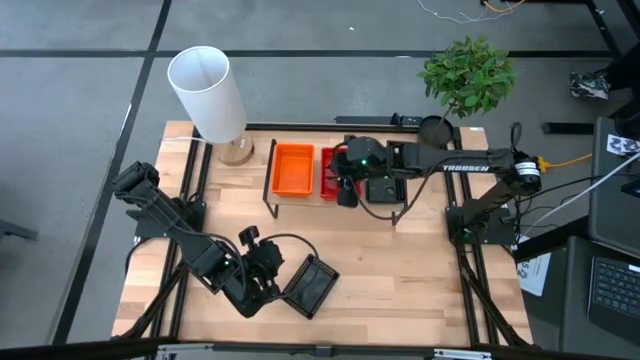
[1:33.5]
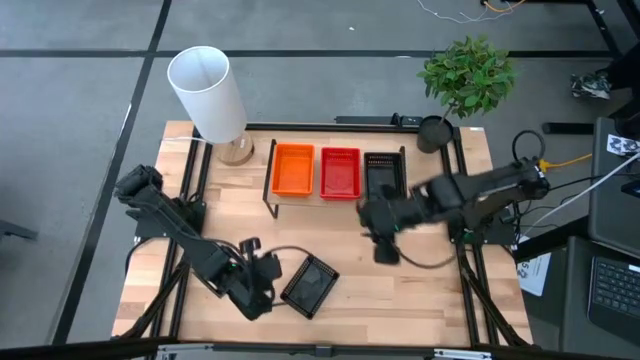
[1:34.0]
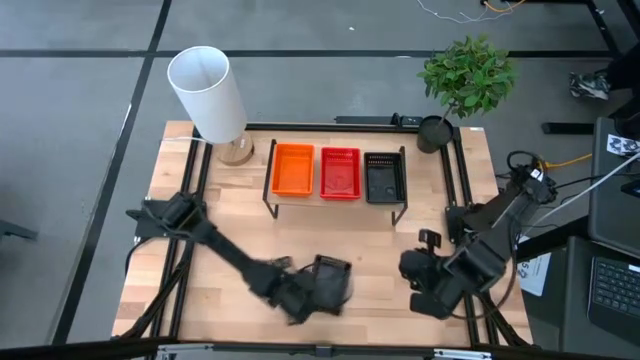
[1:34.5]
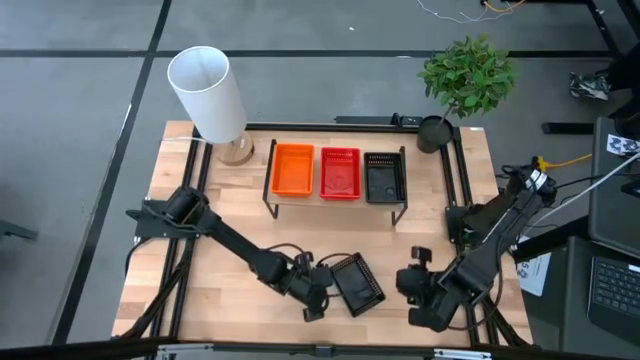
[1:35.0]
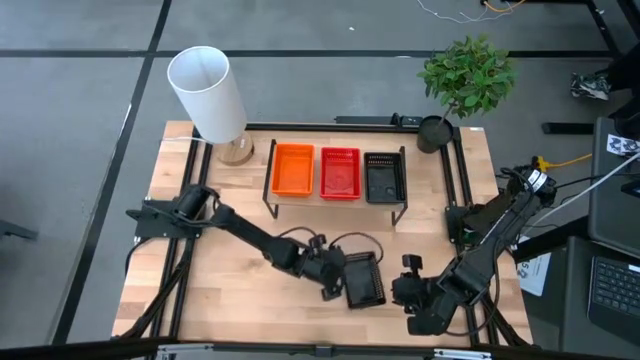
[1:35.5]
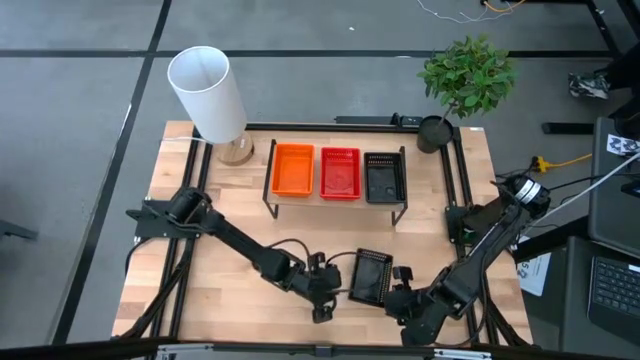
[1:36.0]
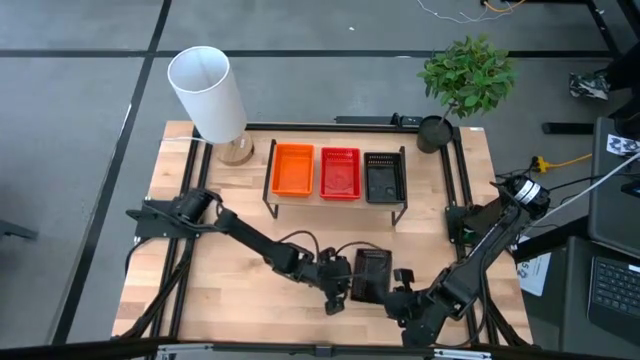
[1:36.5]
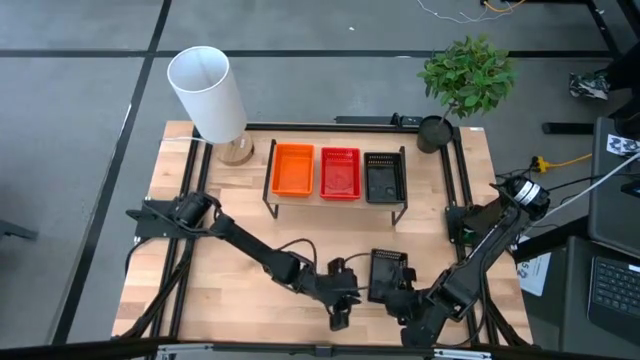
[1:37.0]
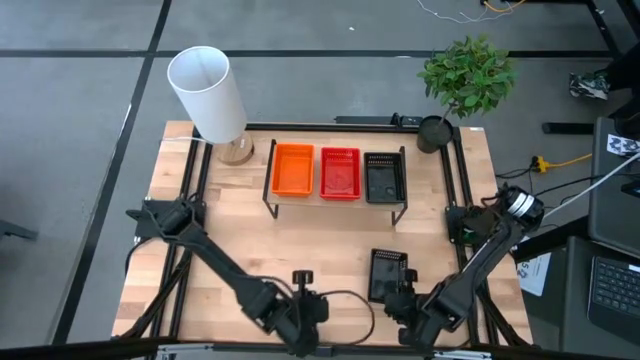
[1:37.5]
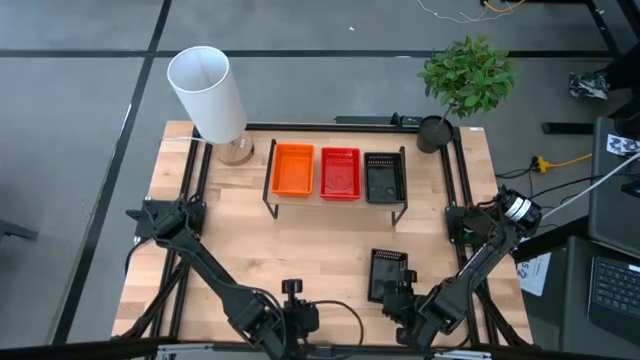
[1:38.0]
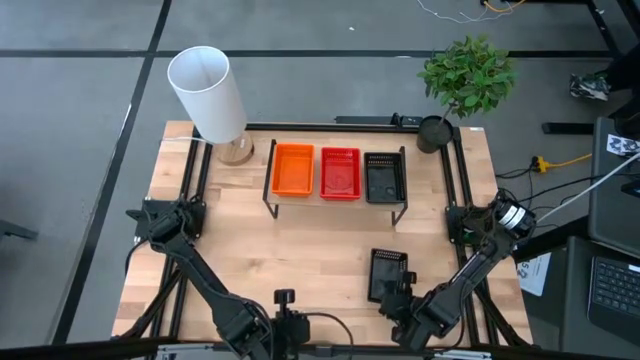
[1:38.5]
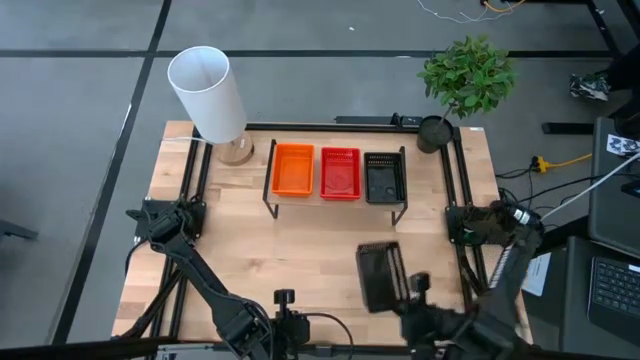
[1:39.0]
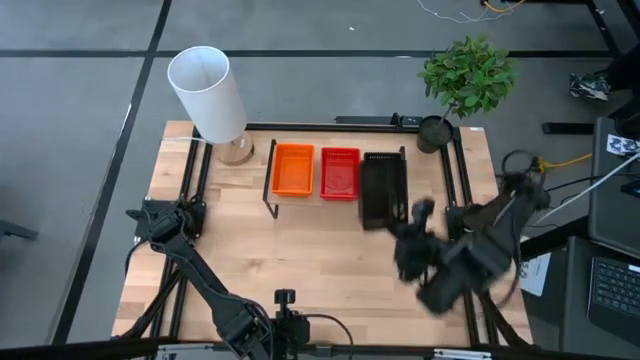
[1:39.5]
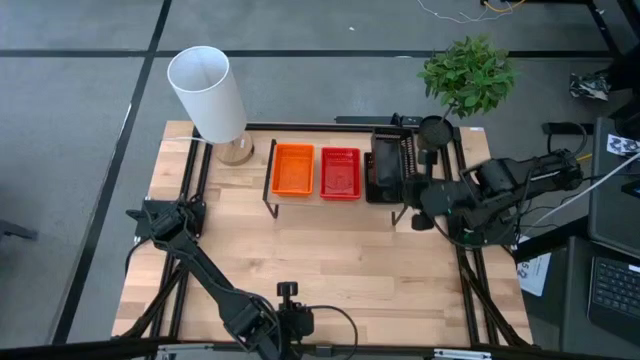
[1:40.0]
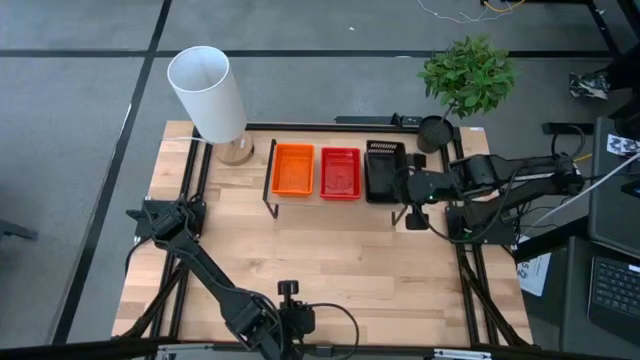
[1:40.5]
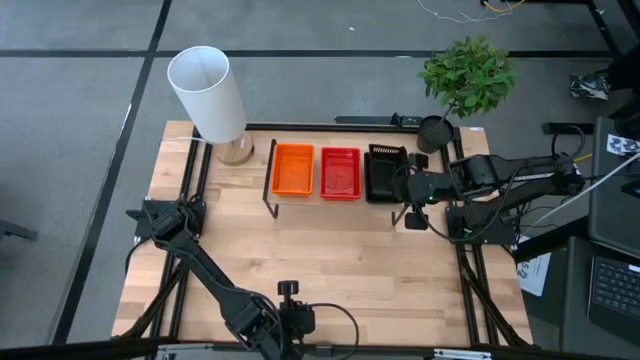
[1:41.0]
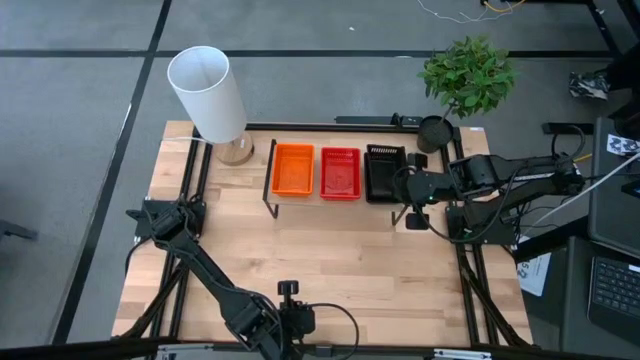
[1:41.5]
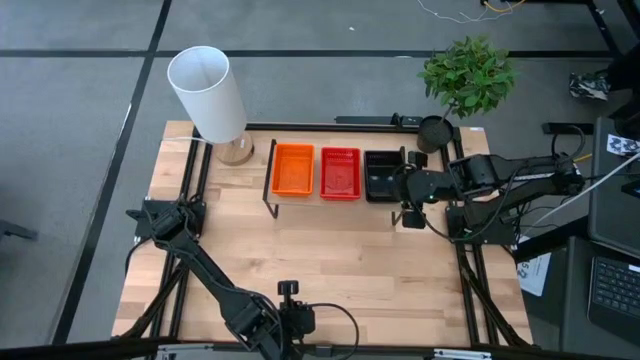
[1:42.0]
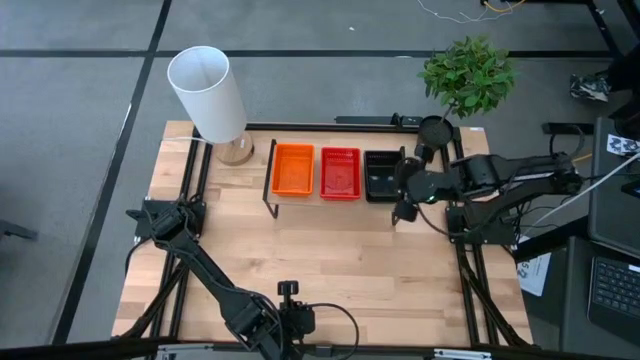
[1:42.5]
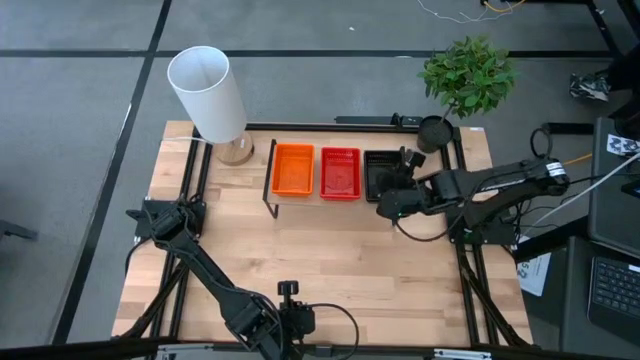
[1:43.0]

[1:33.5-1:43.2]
Task: Stack baskets on shelf by color
Stack the black bin on the top of the other black bins on the shelf

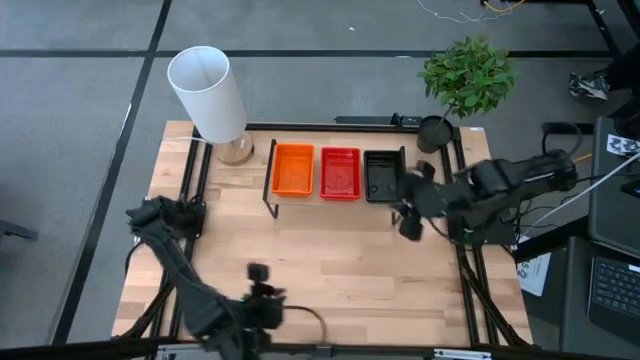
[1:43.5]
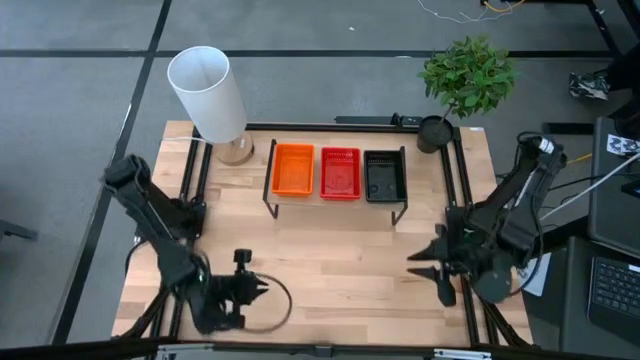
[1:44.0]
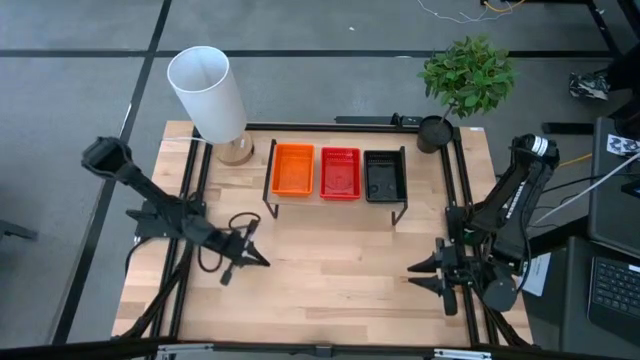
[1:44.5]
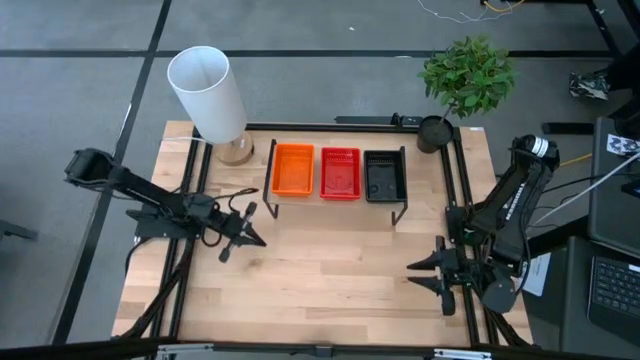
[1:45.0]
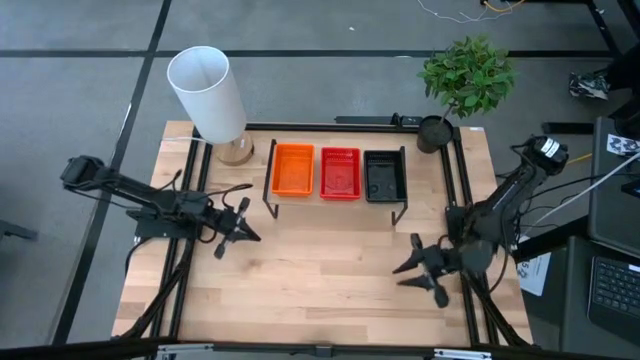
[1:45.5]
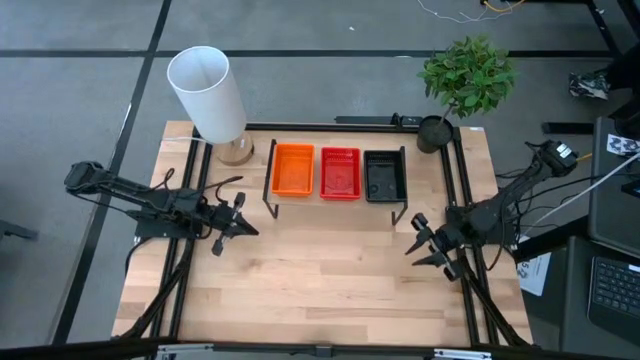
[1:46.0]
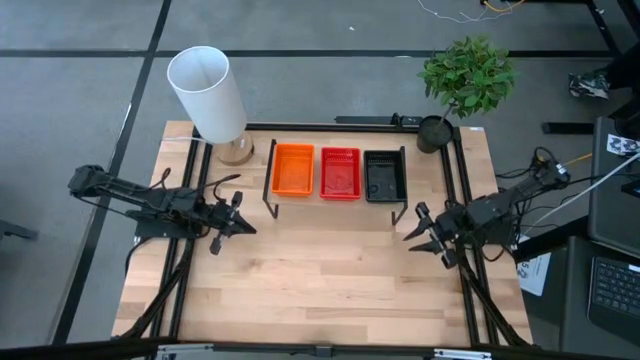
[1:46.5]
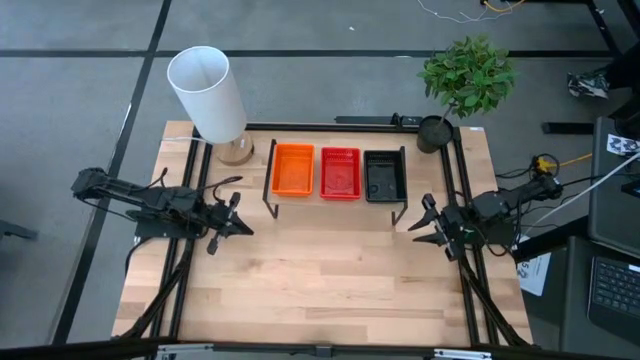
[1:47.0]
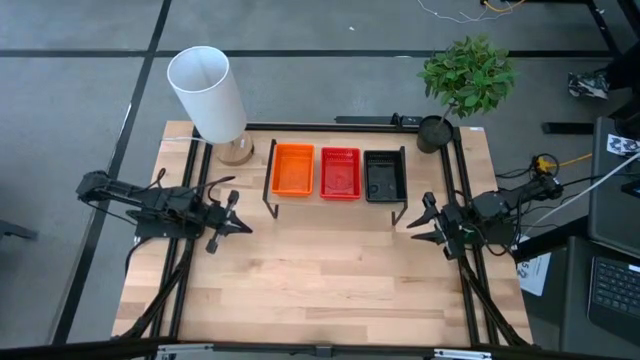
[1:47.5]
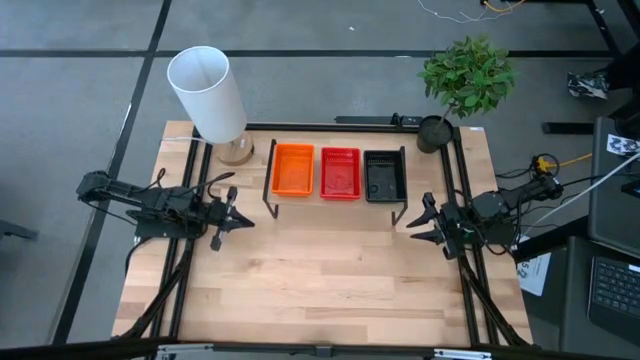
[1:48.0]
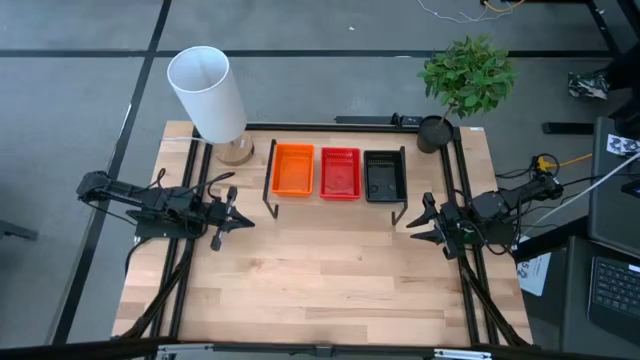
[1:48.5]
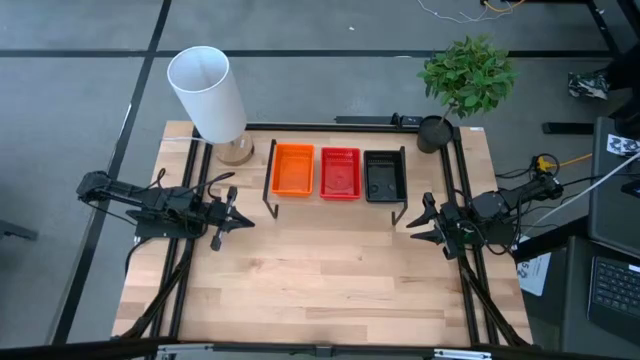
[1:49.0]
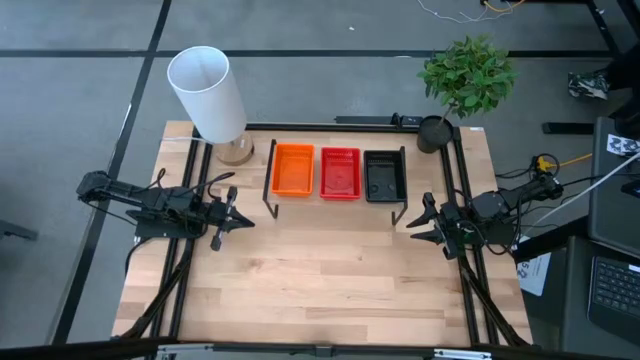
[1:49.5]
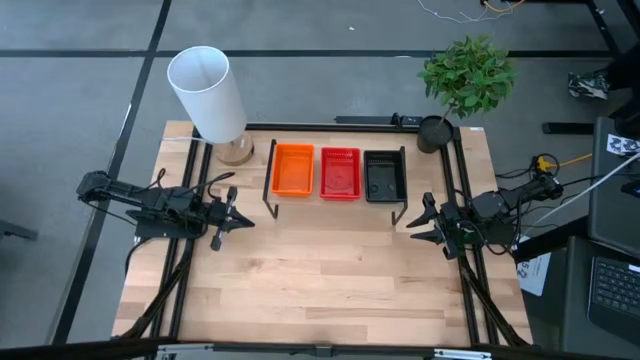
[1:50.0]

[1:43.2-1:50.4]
Return to Home Position
